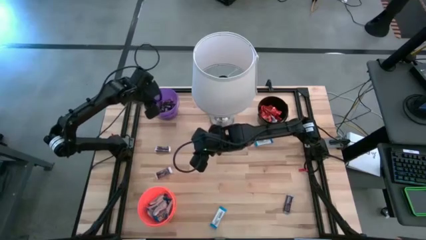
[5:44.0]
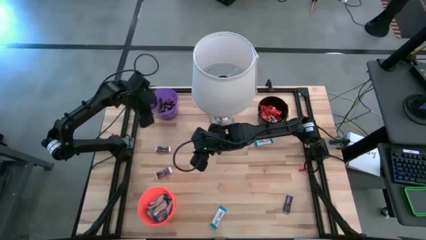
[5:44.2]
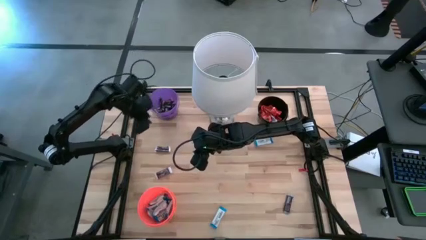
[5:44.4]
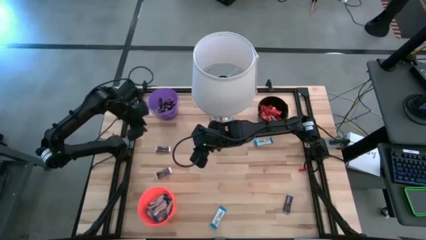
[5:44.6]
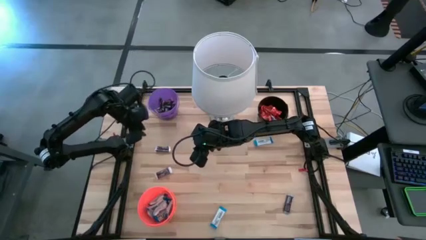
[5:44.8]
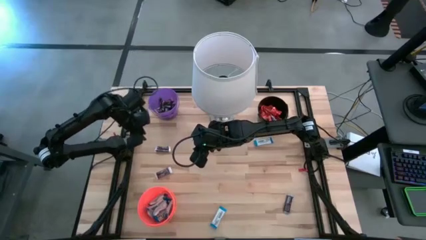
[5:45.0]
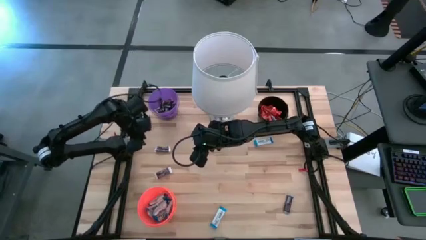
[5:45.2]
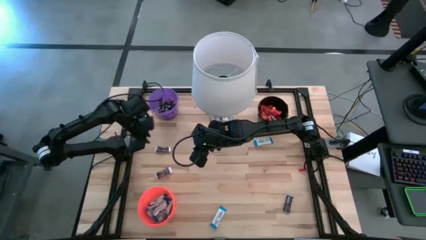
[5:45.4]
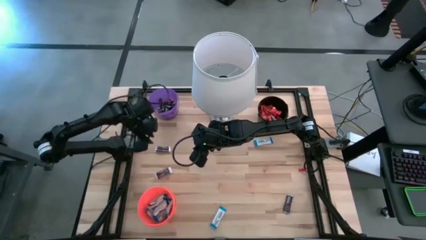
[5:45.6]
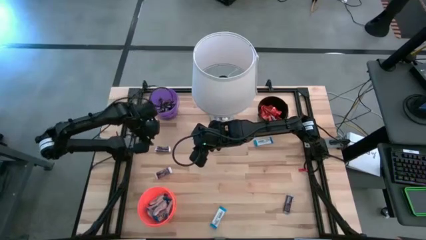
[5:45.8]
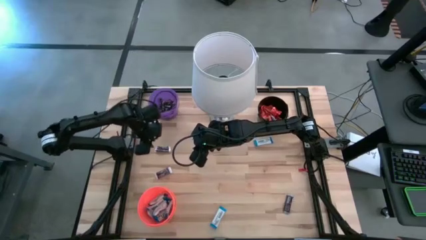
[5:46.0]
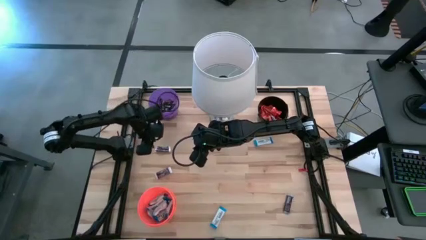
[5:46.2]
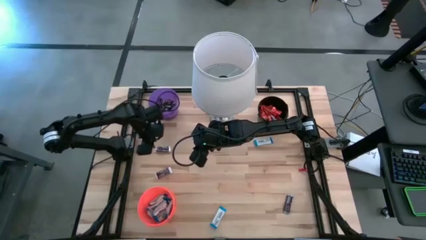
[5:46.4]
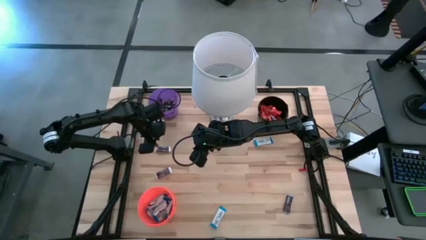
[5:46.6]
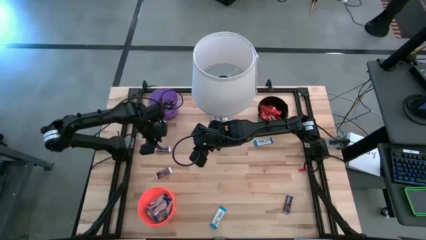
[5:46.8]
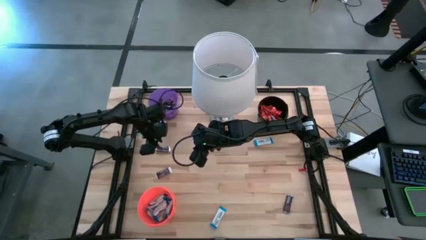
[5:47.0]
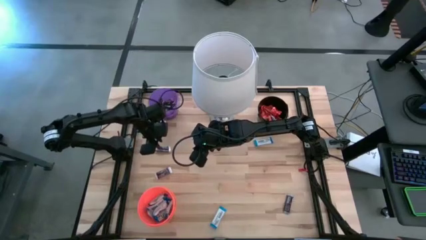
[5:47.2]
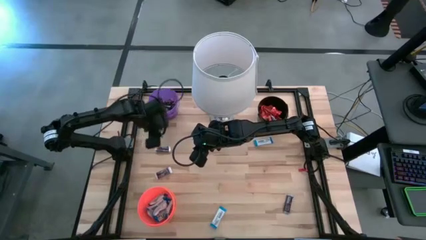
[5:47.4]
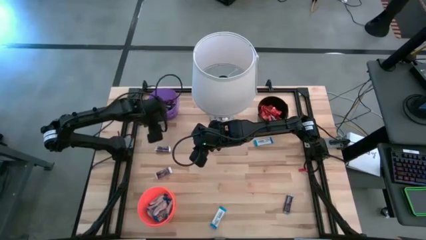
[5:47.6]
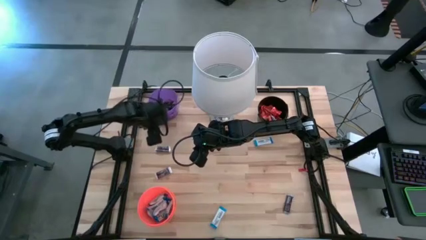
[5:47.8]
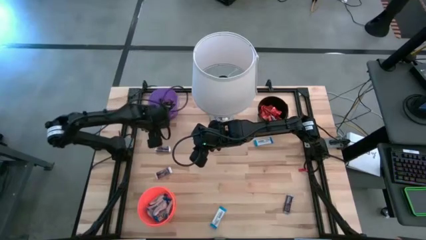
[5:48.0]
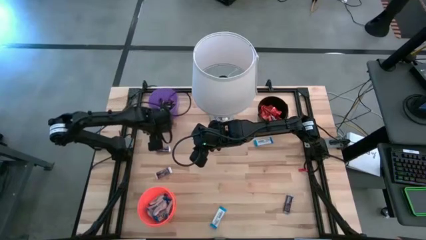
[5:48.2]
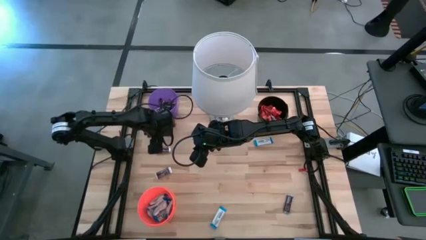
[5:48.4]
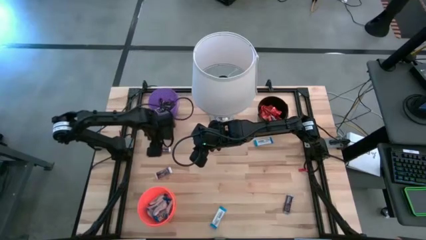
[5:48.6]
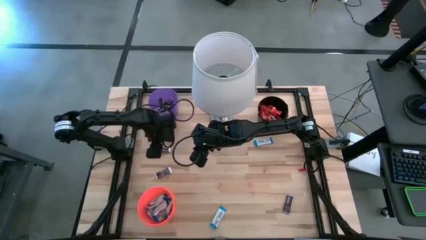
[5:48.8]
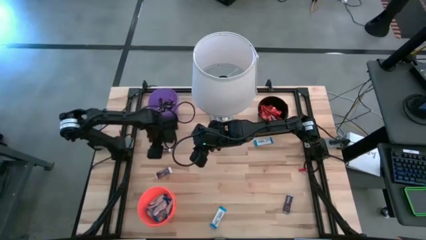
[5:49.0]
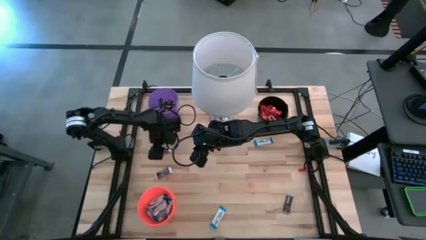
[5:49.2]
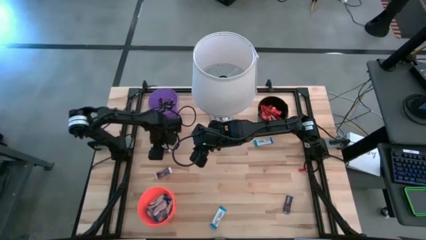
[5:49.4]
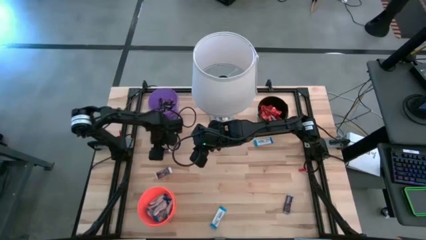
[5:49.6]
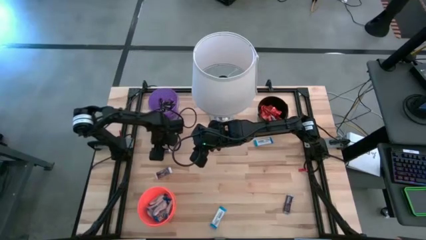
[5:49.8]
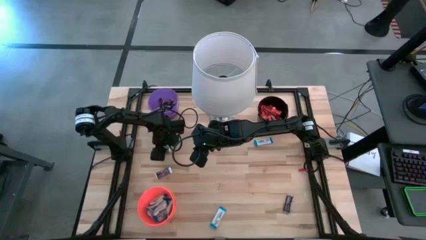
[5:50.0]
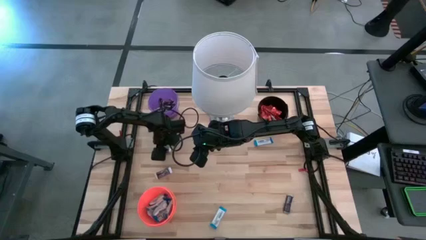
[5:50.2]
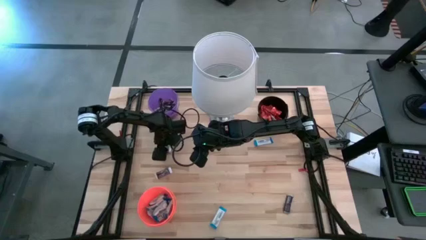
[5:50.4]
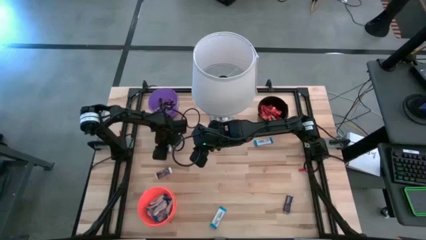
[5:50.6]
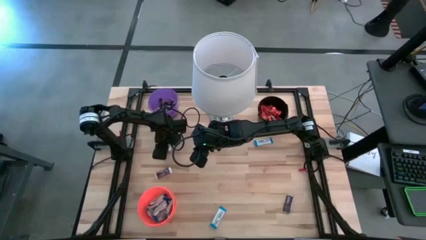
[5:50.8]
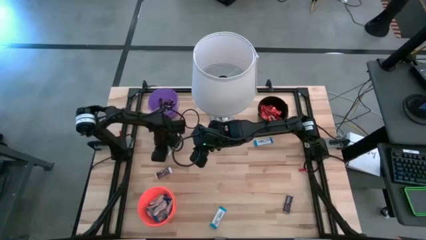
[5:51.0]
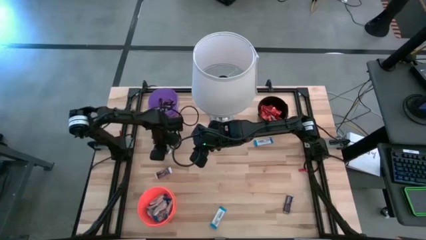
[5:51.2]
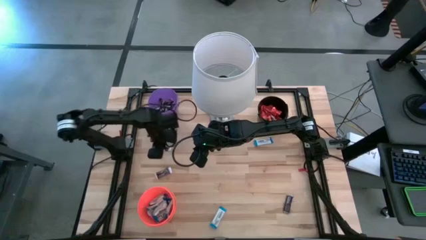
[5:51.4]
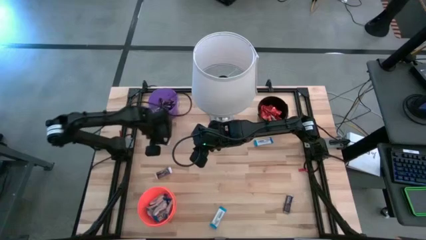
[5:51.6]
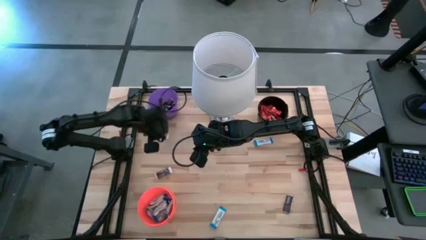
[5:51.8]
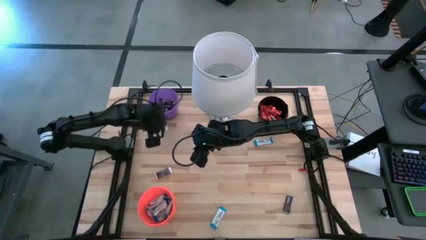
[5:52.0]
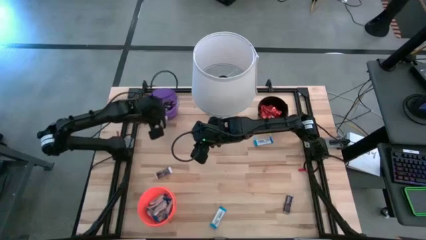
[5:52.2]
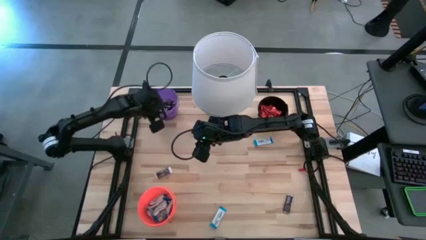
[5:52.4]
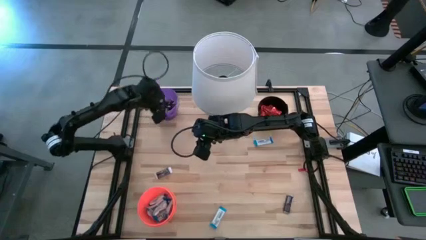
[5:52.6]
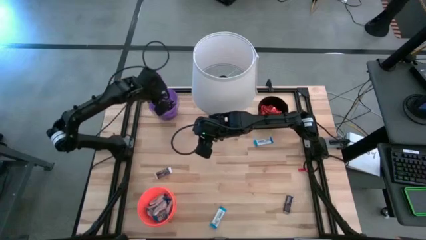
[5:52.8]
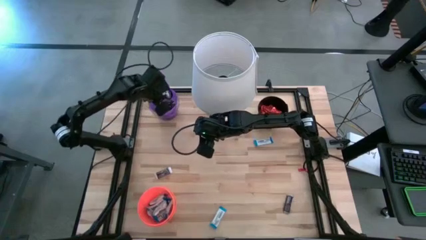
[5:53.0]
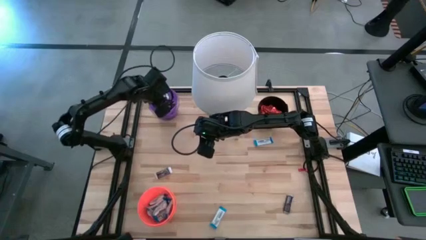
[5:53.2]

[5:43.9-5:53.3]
Task: Organize candy in baskets
Put the brown chocolate bar into the purple bucket

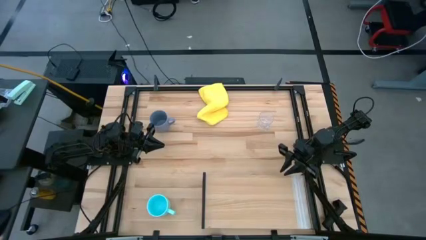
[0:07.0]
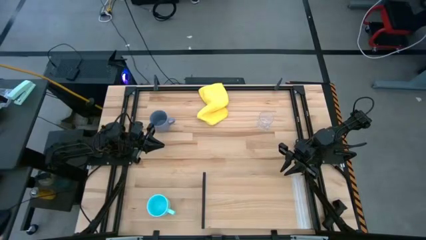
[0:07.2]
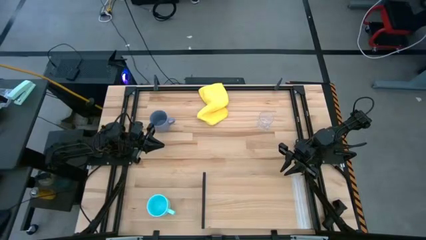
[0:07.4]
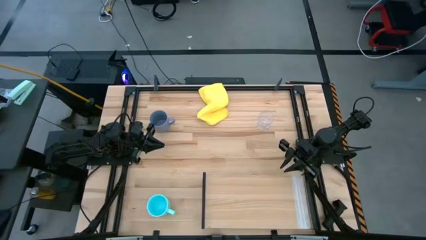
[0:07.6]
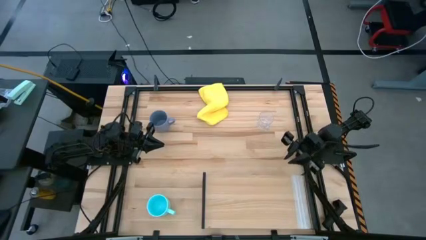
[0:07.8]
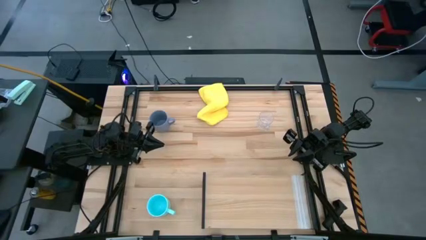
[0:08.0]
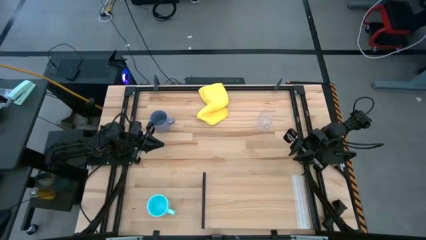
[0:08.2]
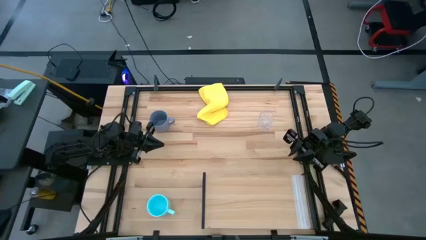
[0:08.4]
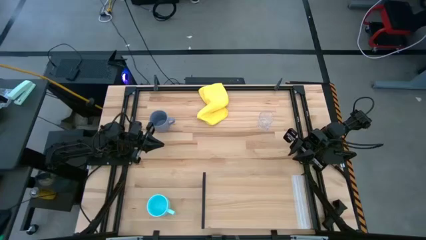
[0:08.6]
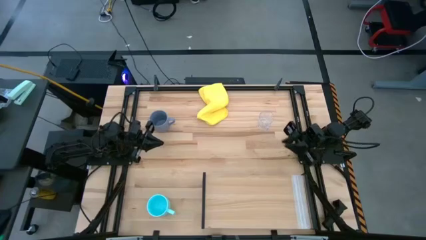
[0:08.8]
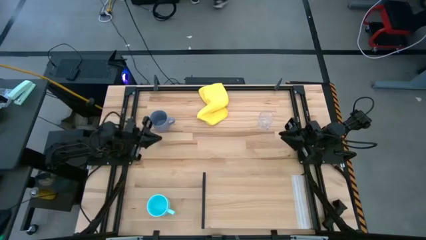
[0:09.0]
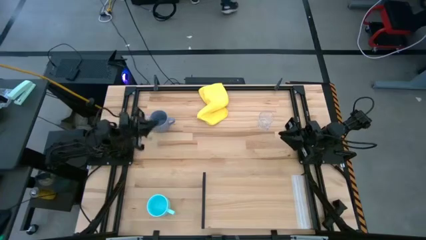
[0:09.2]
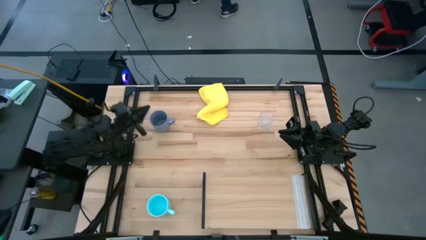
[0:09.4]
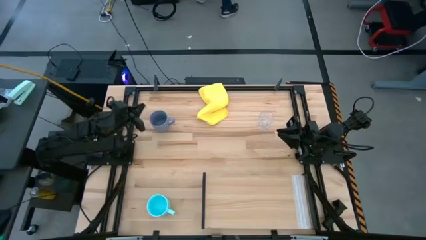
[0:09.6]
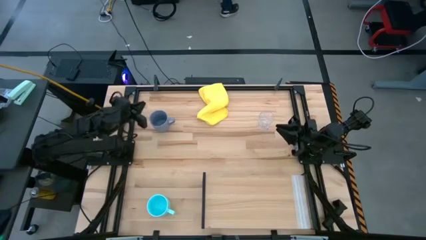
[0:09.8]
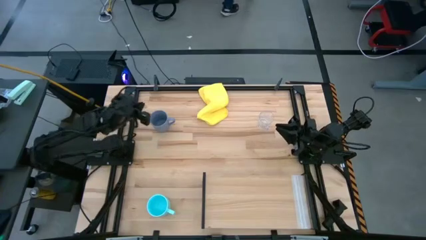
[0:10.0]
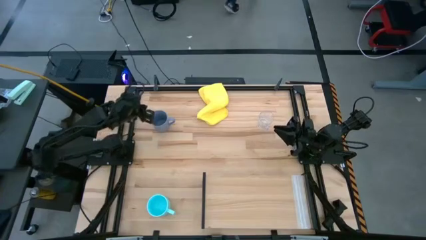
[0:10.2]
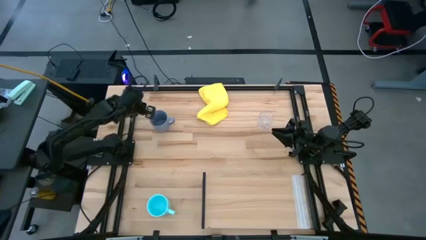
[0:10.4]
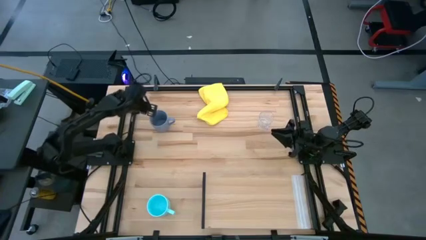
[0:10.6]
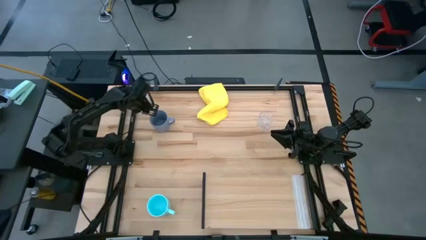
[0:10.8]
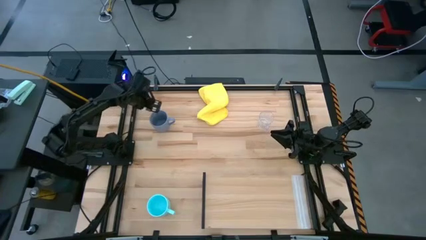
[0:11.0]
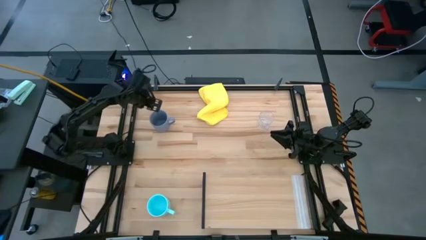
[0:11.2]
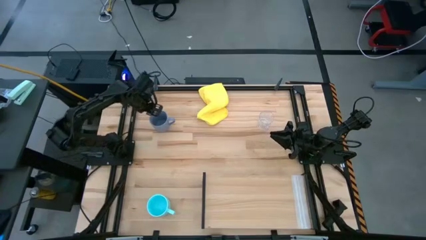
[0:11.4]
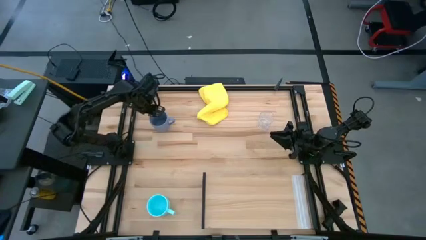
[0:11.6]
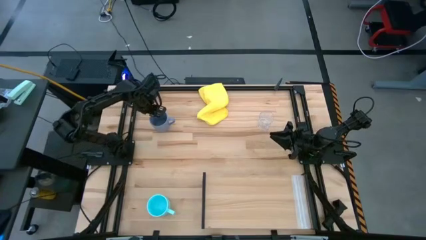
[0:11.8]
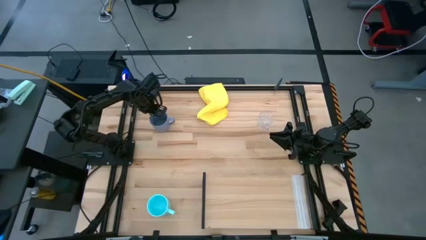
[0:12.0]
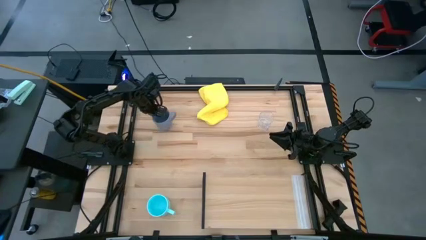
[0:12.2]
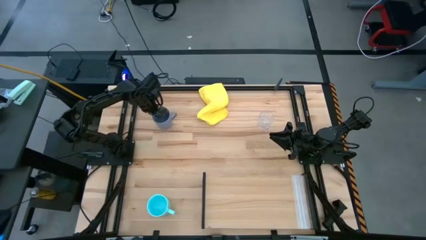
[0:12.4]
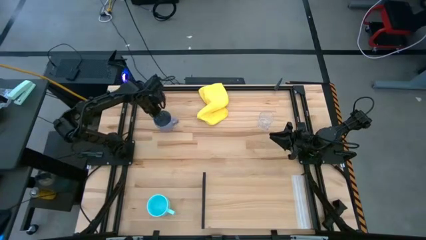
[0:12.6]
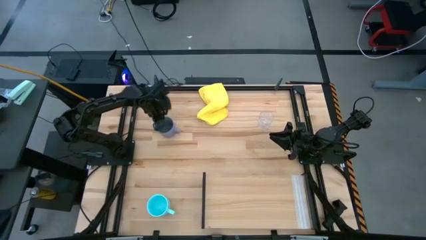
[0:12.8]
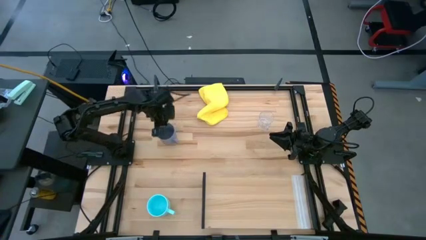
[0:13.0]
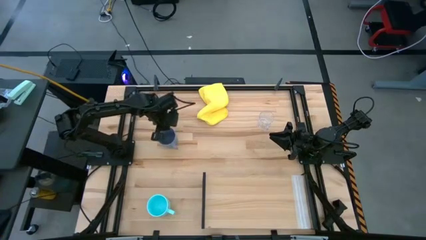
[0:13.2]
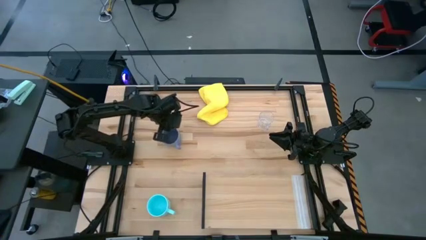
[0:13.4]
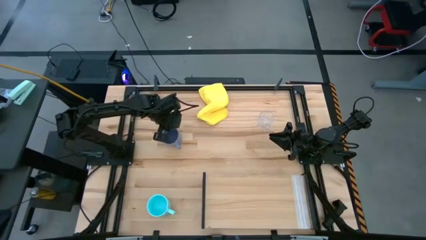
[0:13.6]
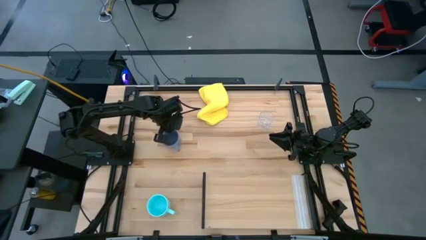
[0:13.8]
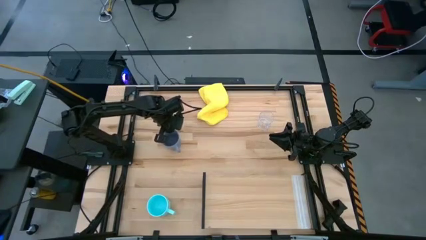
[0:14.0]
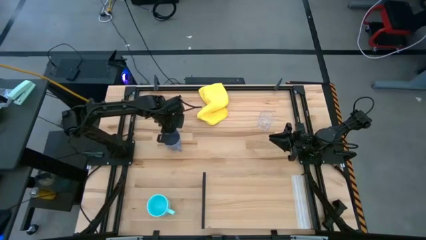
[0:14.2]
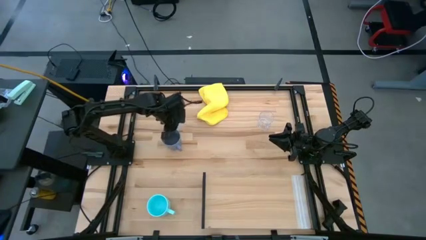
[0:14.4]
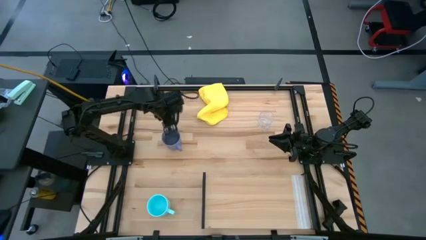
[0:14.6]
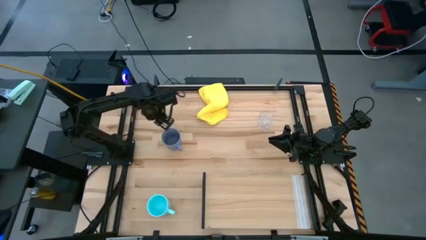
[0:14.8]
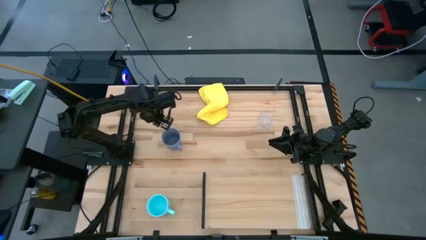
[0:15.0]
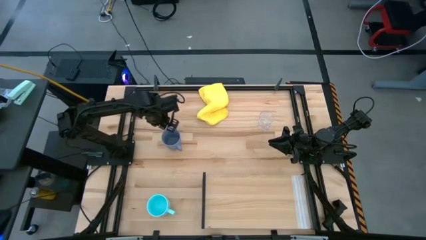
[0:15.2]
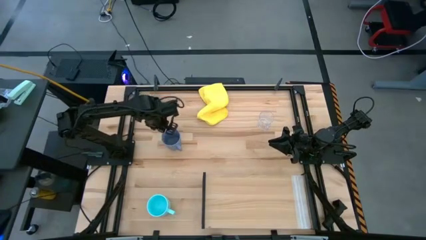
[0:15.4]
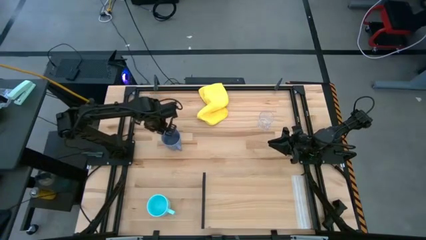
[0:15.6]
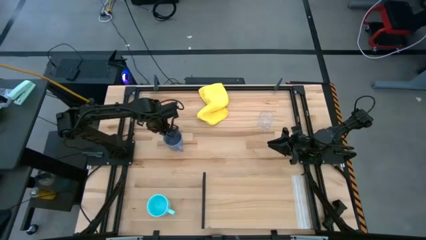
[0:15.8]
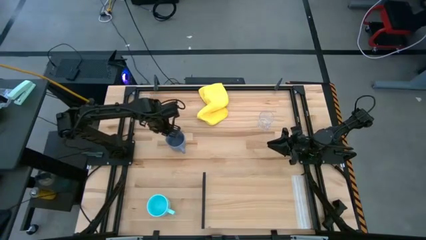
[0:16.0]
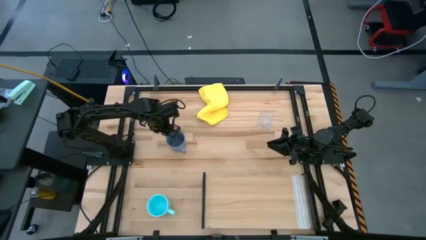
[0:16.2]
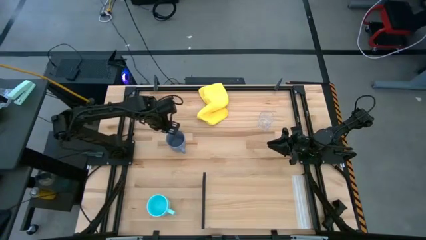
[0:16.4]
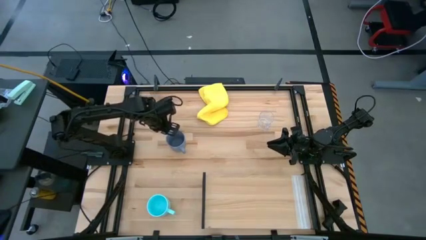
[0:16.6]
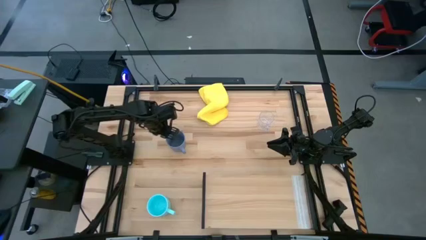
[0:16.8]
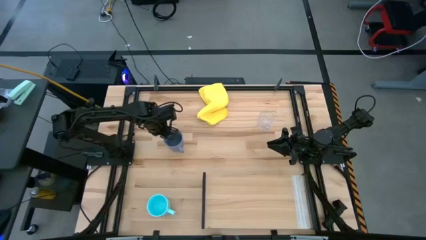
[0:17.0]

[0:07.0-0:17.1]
Task: Stack small to large cups/mugs on shelf
Put the blue mug on the shelf
